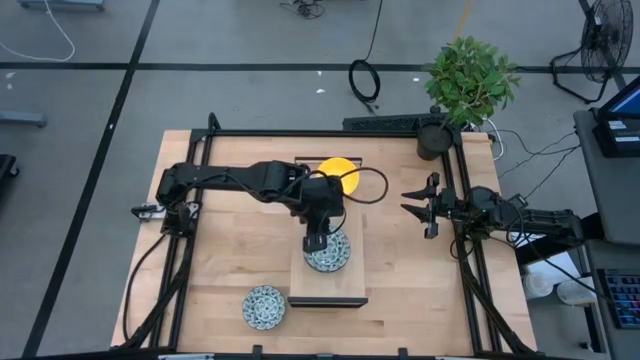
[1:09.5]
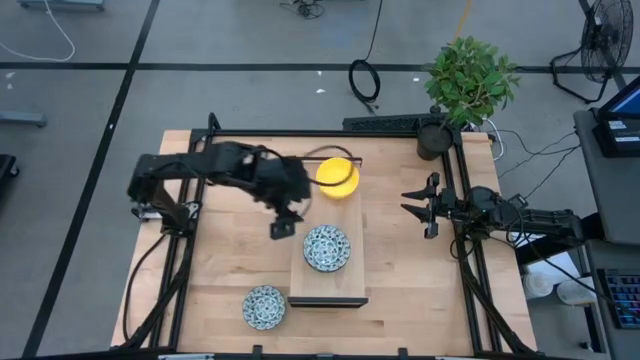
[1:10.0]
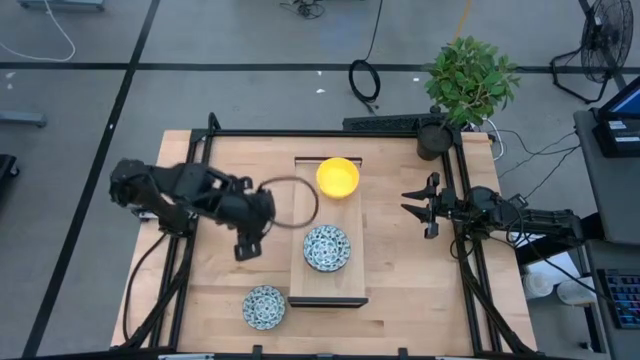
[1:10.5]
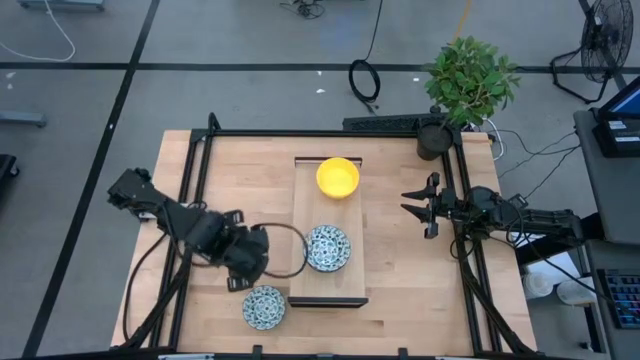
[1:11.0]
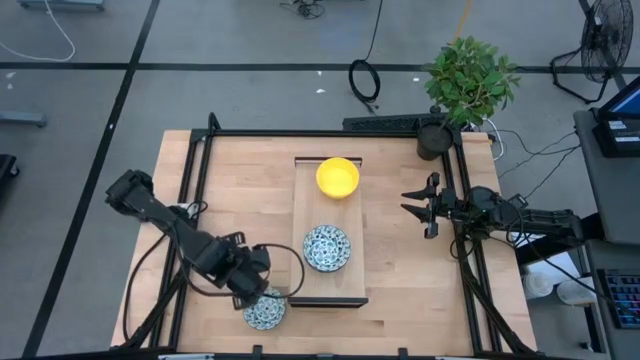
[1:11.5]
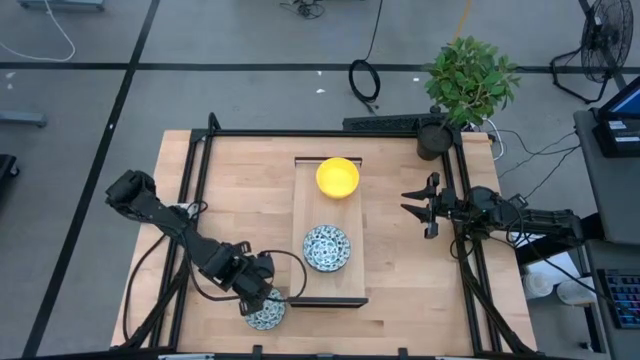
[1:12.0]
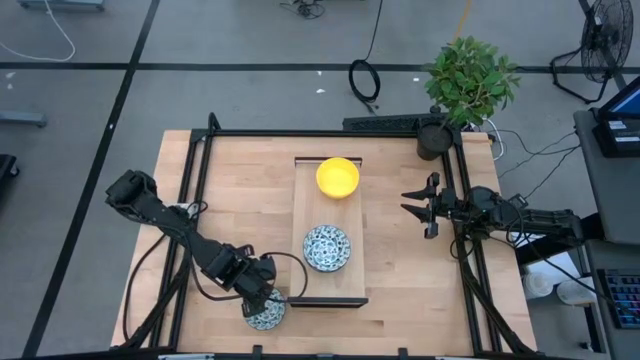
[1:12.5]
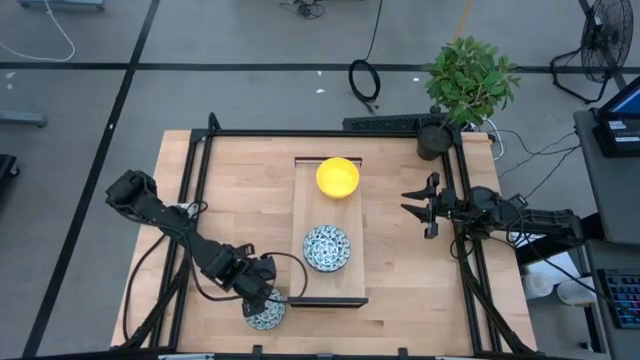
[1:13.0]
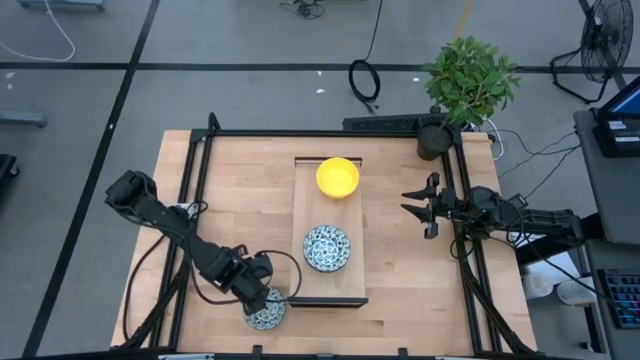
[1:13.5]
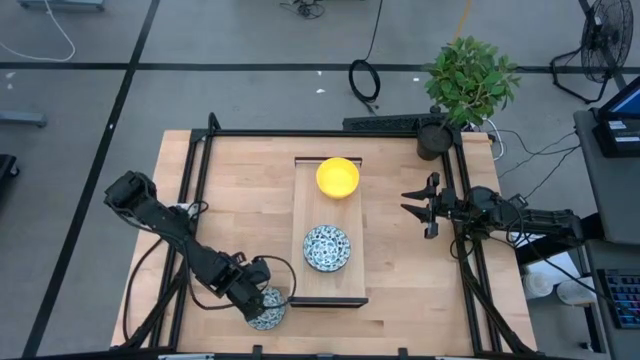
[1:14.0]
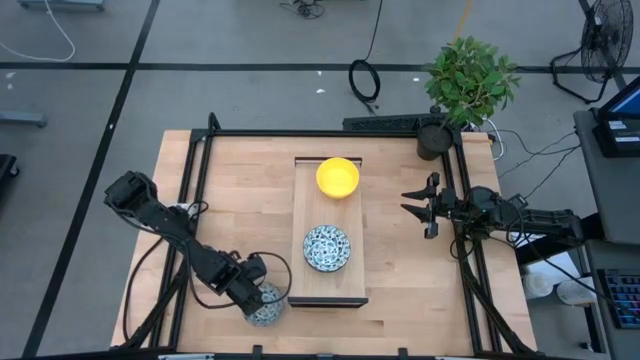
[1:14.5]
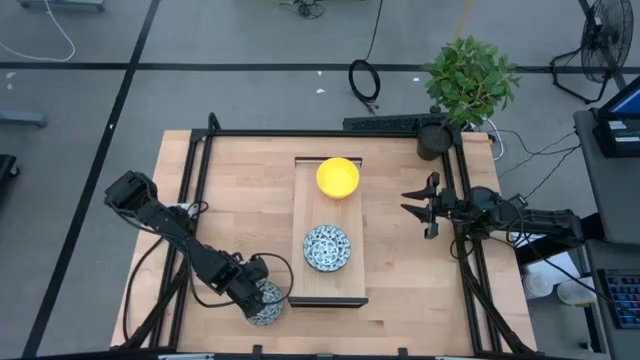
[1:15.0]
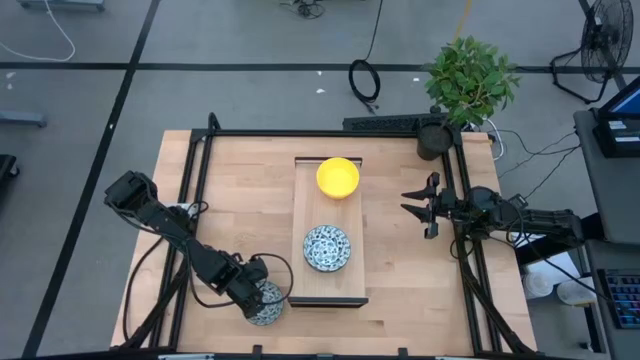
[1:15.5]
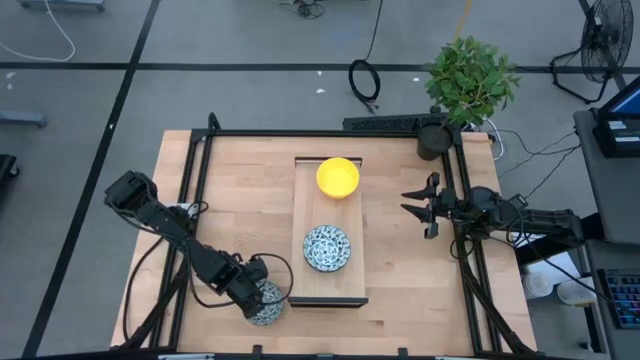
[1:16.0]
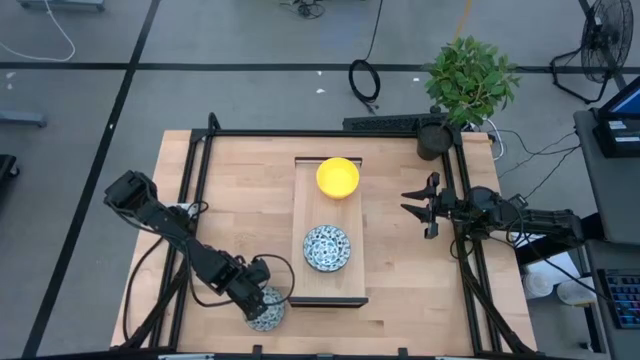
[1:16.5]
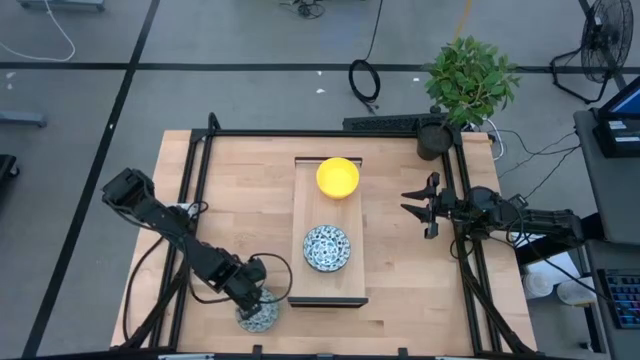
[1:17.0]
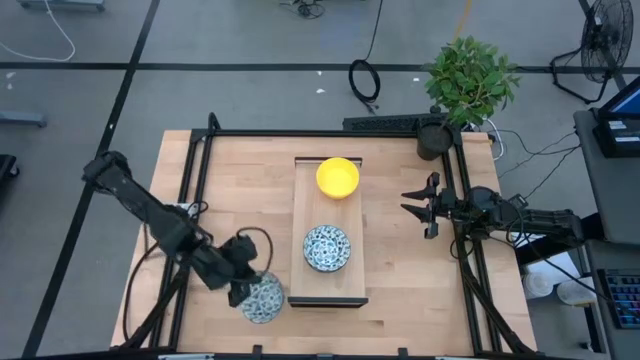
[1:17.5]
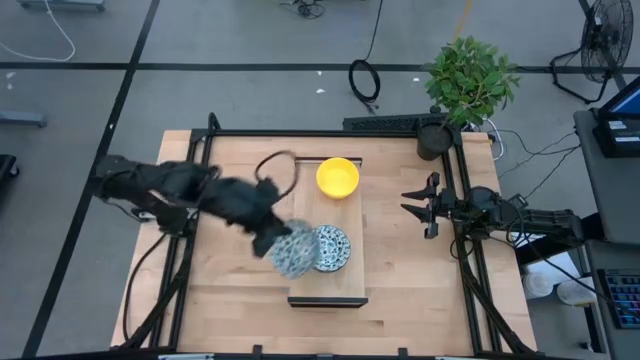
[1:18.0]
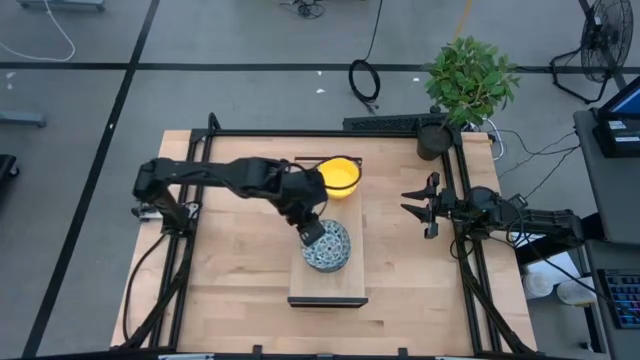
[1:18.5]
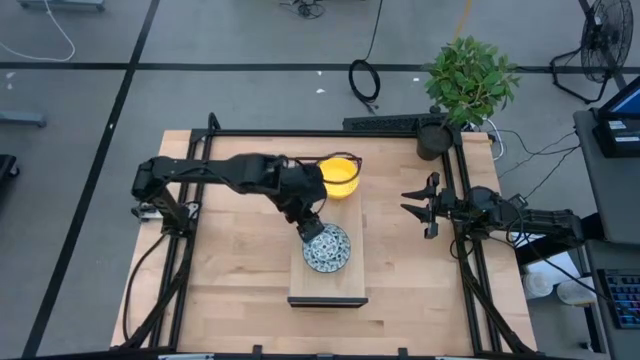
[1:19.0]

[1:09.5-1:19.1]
Task: Pick & Place Mini bowls
Stack the blue patterned bowl on top of the blue patterned bowl on the shelf

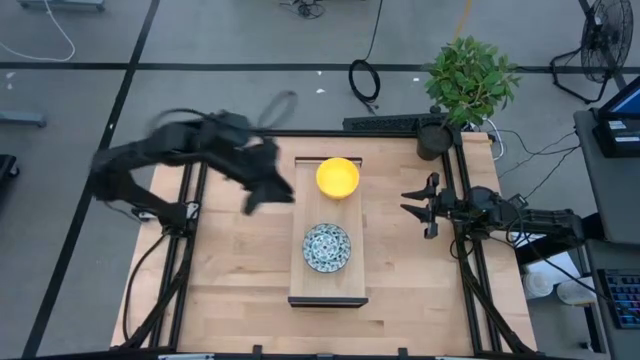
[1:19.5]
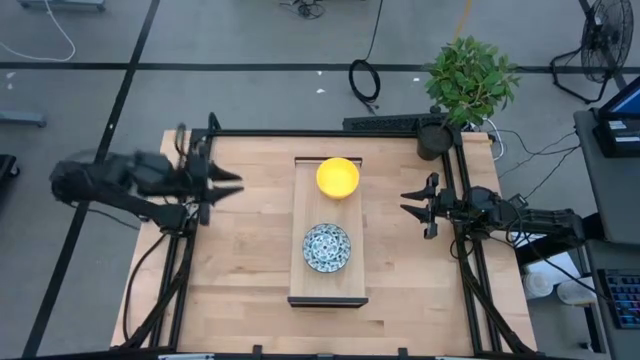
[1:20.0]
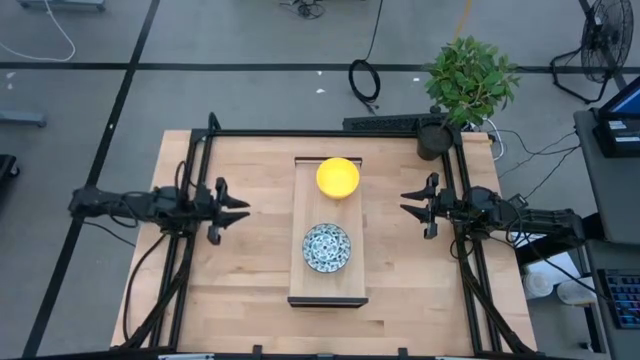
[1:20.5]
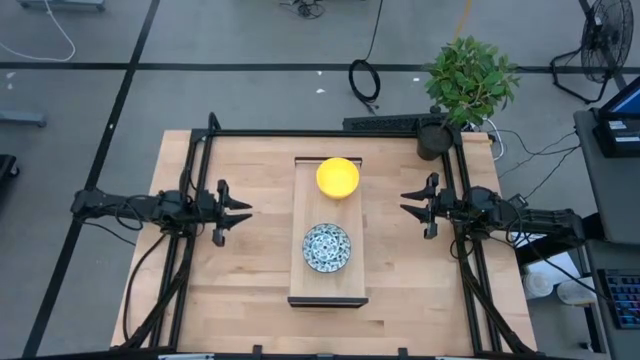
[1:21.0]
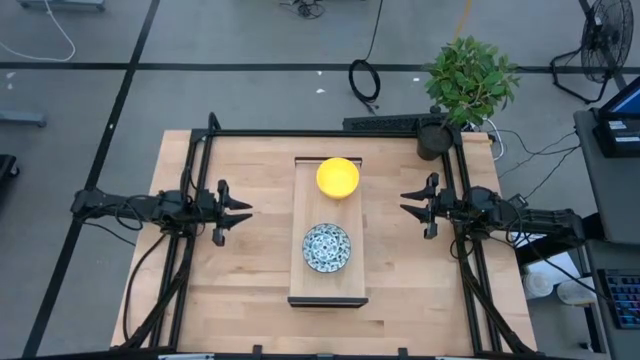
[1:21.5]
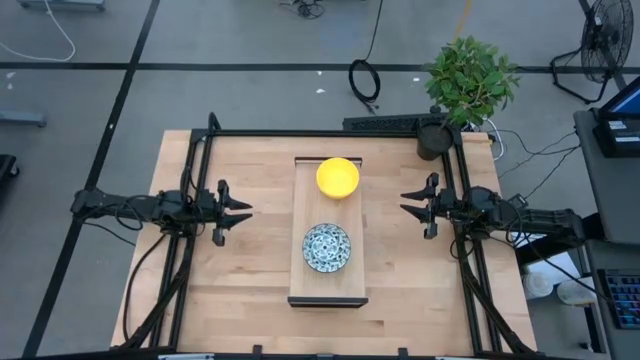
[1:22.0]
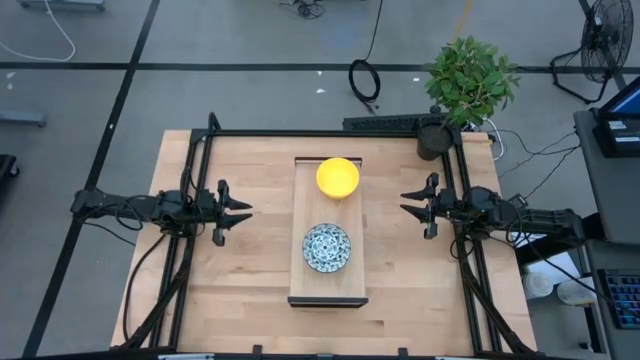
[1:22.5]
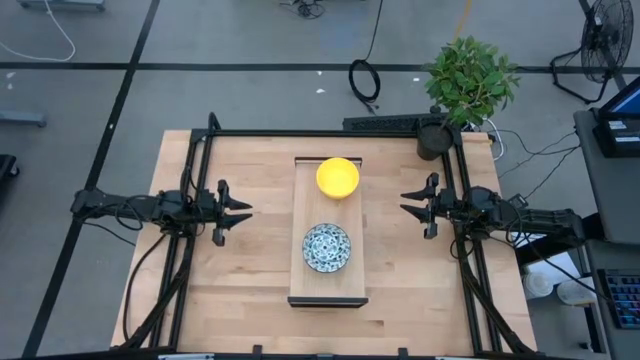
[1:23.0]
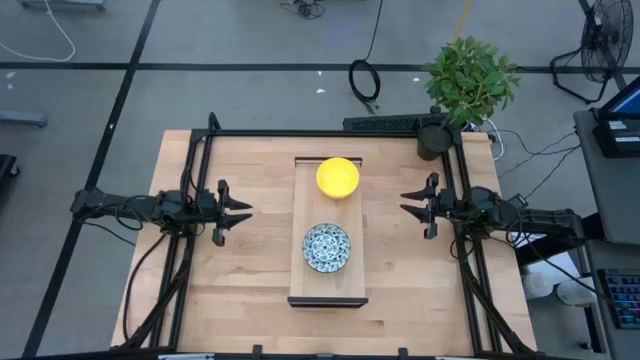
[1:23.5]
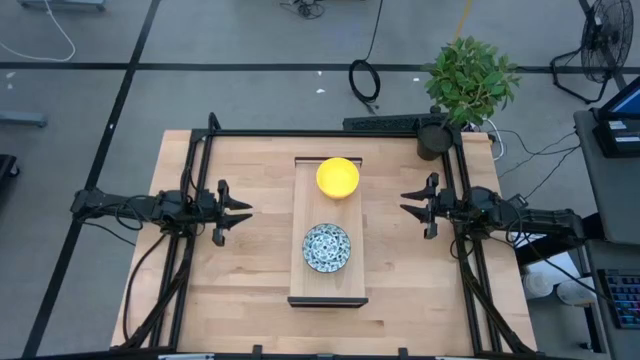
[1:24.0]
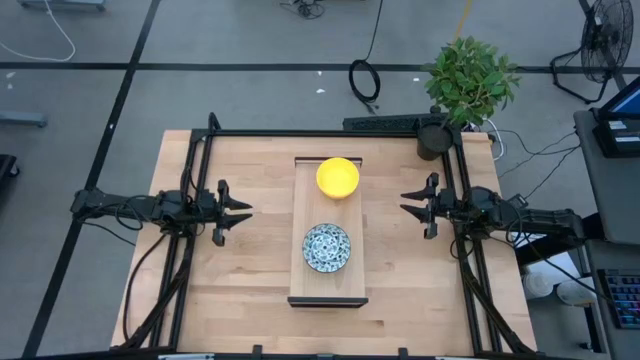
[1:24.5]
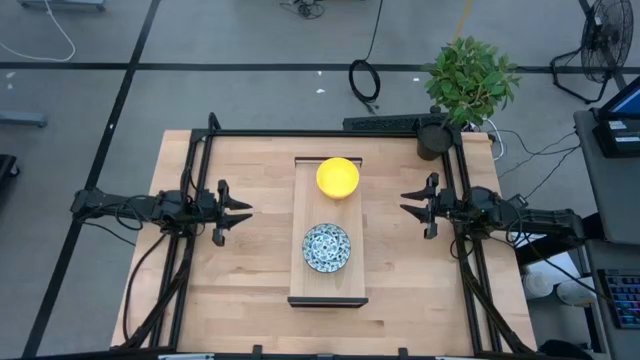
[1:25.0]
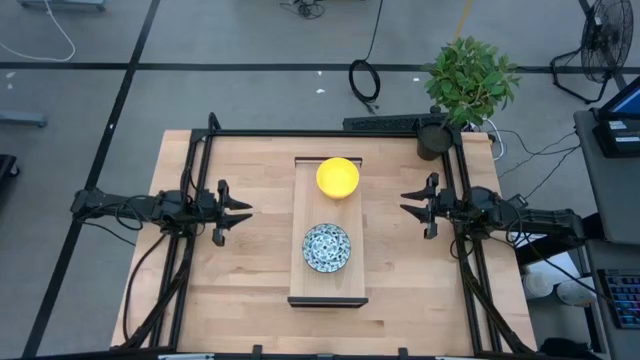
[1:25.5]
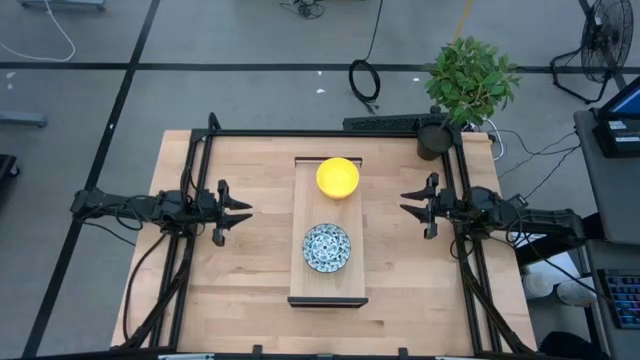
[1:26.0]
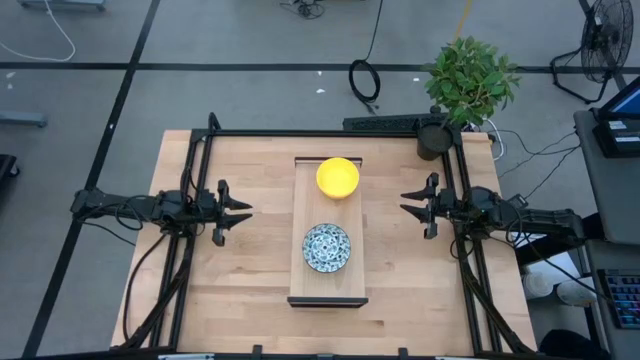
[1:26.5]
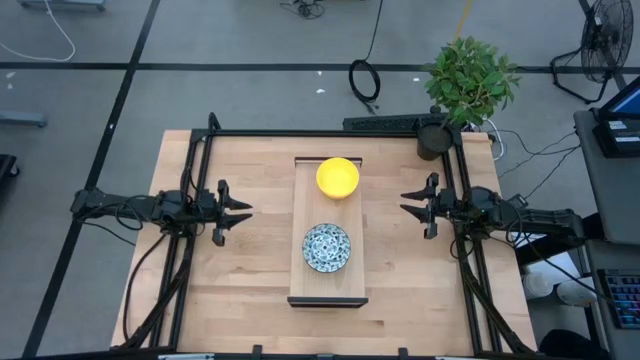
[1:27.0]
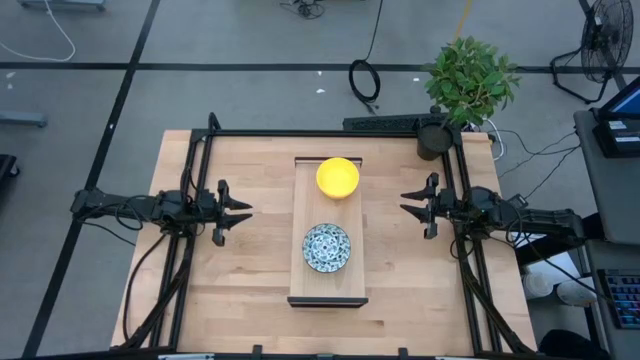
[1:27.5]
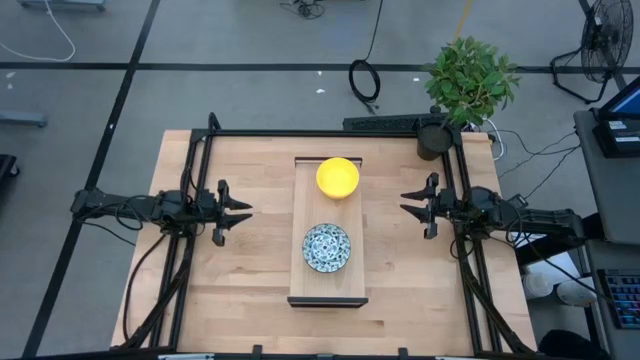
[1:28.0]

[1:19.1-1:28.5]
Return to Home Position

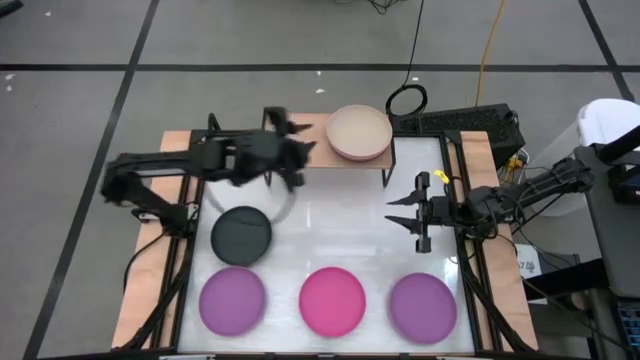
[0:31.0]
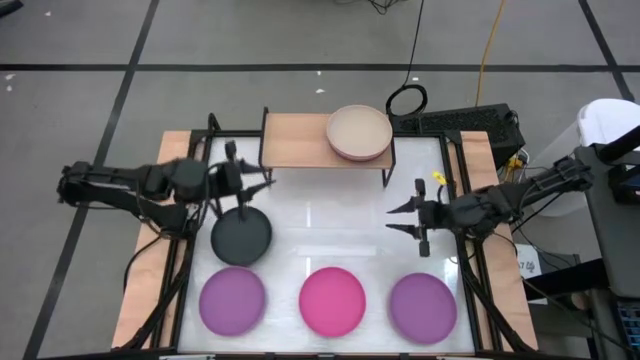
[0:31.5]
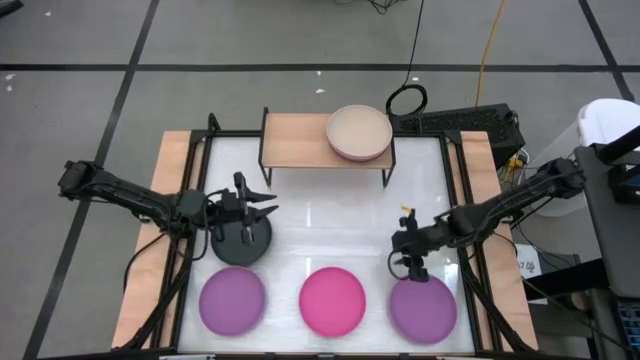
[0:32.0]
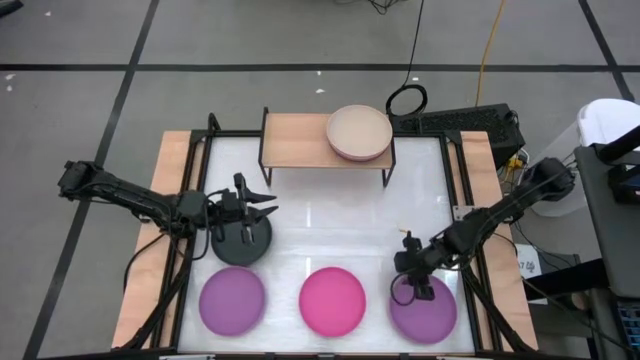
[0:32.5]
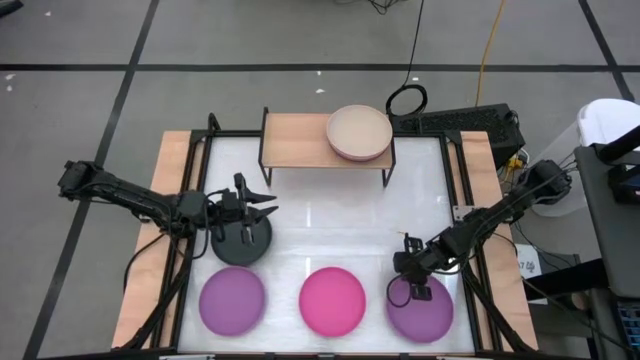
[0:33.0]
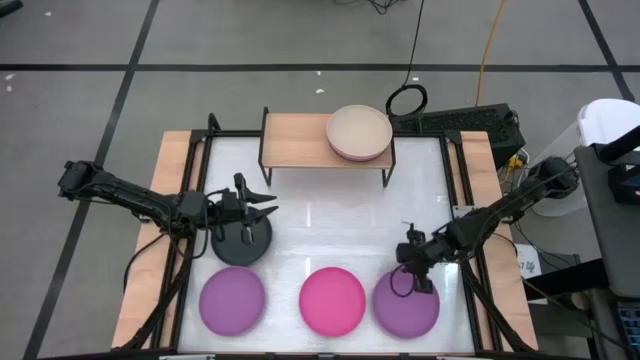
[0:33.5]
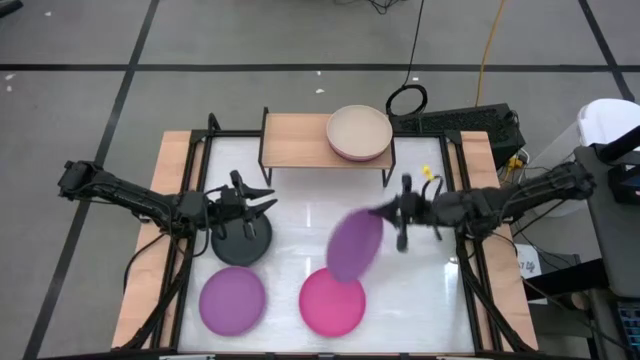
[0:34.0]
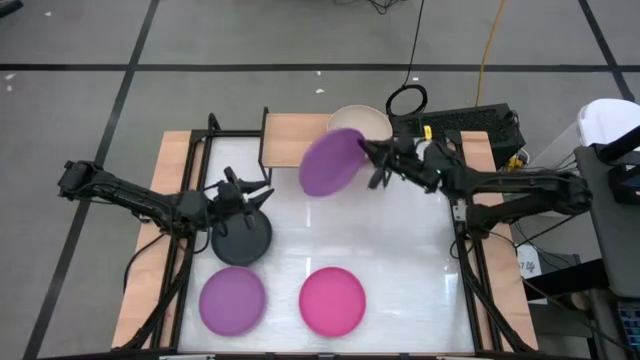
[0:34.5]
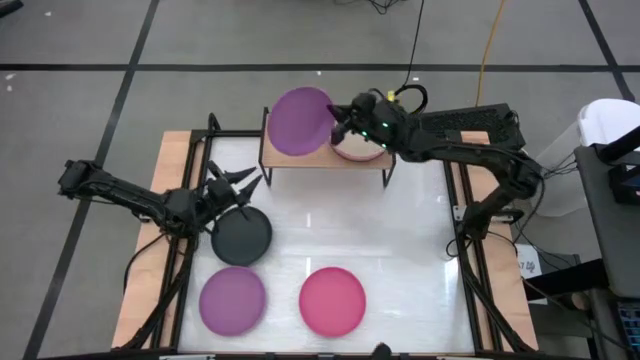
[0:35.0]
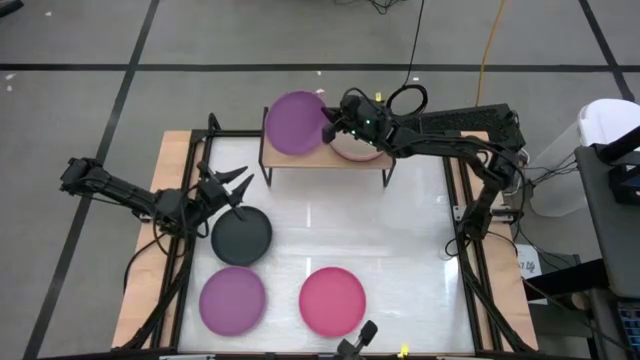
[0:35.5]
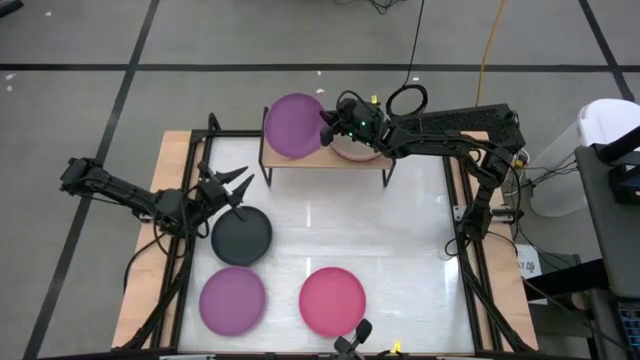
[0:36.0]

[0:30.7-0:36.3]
Task: Place and stack plates onto a shelf
Put the right purple plate on the shelf
